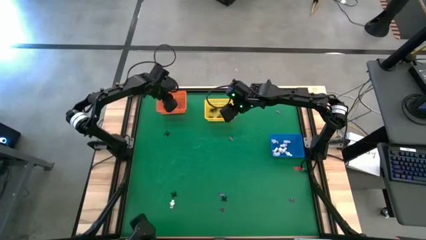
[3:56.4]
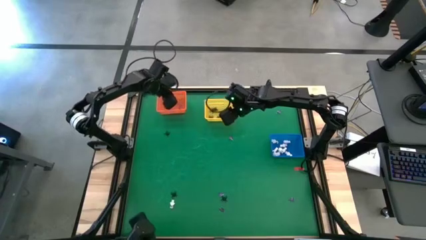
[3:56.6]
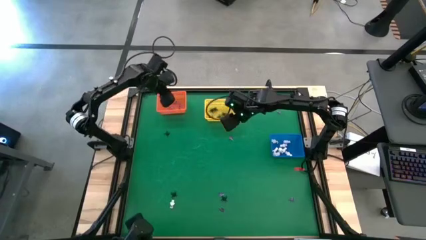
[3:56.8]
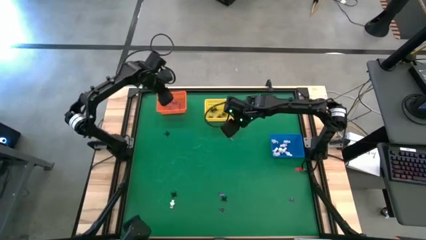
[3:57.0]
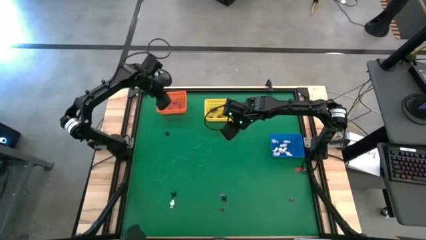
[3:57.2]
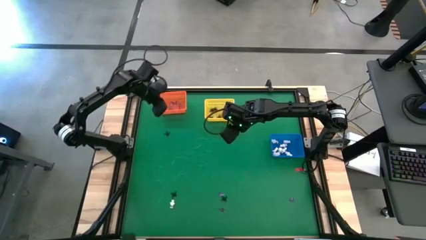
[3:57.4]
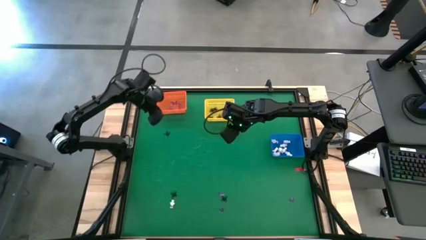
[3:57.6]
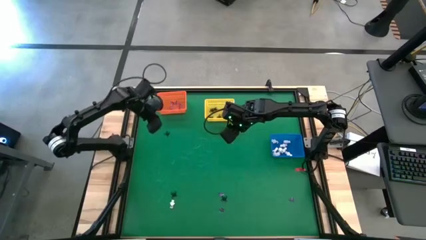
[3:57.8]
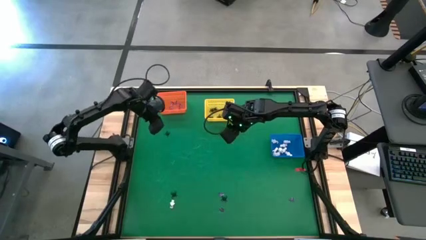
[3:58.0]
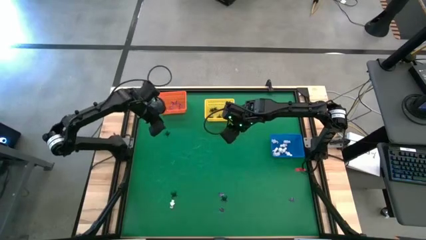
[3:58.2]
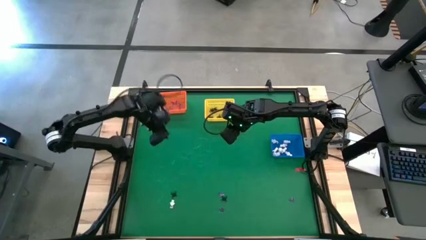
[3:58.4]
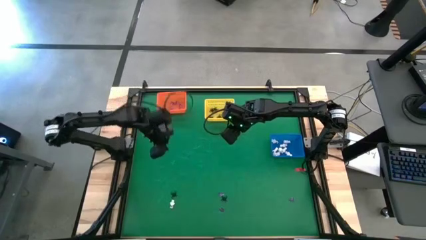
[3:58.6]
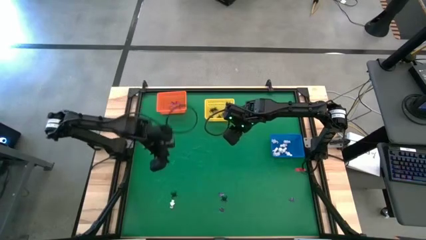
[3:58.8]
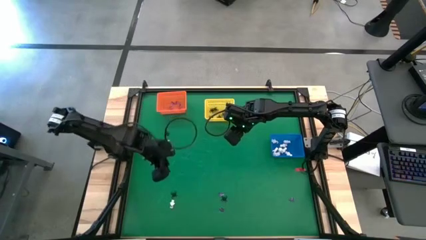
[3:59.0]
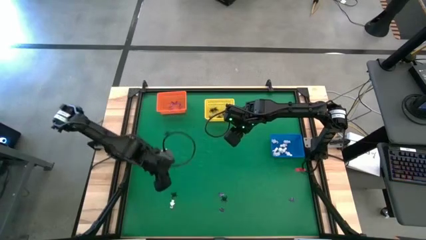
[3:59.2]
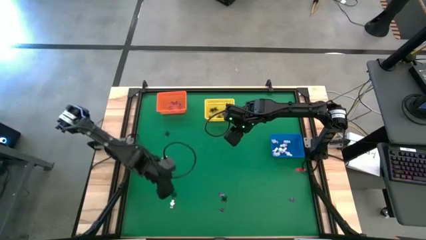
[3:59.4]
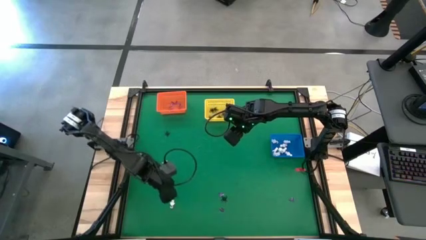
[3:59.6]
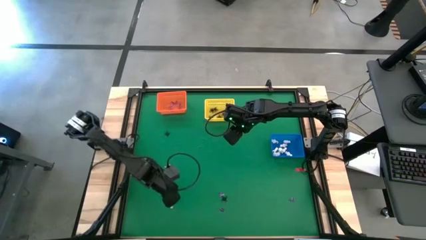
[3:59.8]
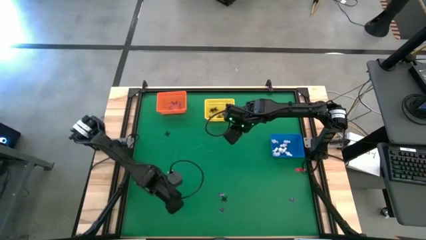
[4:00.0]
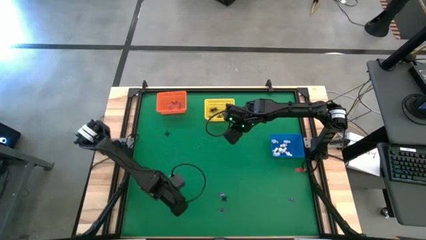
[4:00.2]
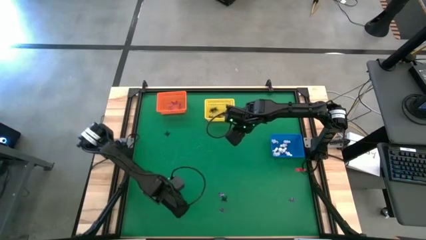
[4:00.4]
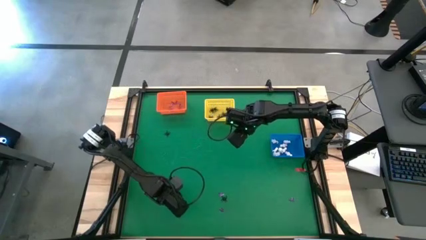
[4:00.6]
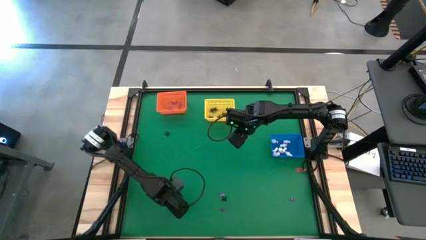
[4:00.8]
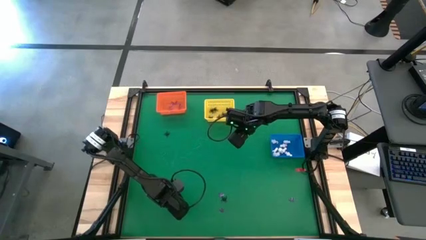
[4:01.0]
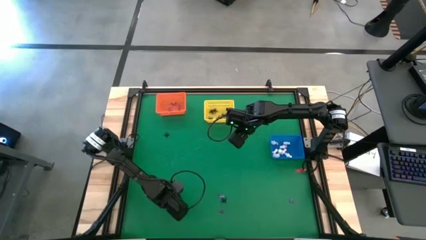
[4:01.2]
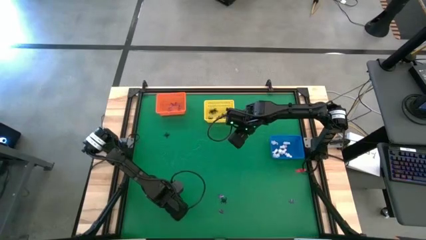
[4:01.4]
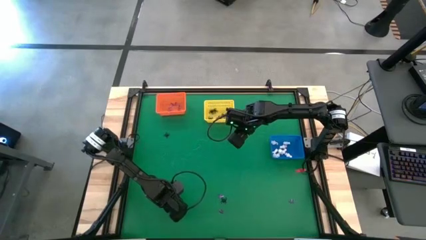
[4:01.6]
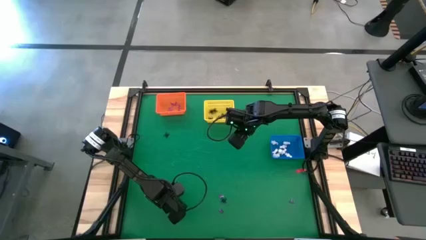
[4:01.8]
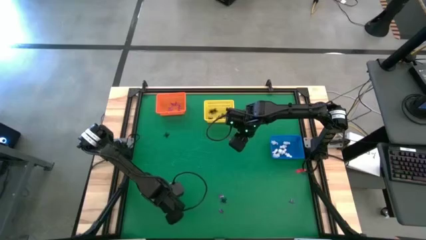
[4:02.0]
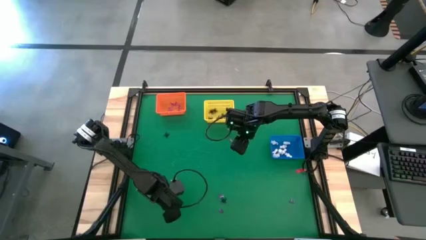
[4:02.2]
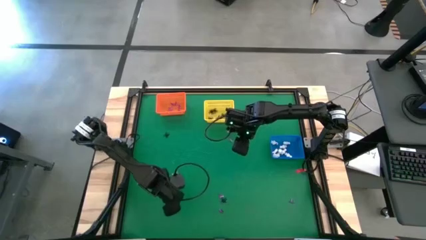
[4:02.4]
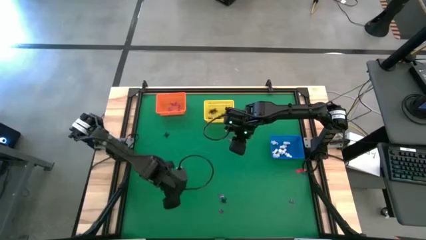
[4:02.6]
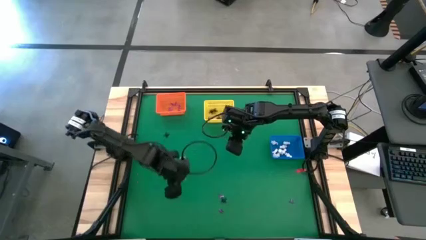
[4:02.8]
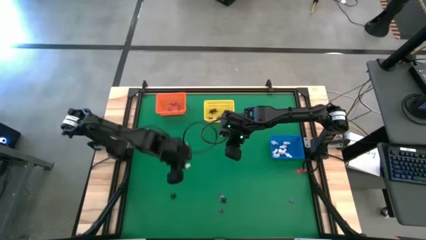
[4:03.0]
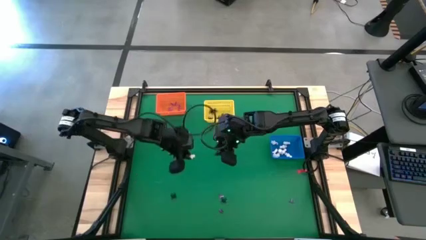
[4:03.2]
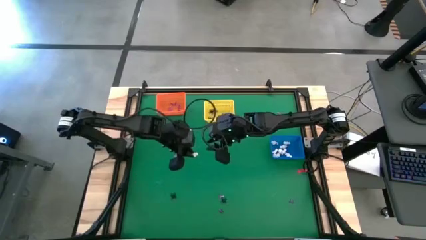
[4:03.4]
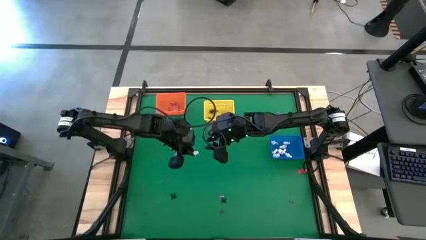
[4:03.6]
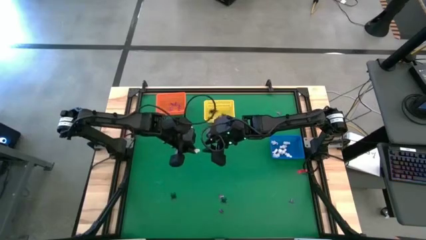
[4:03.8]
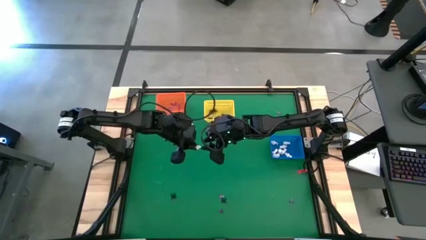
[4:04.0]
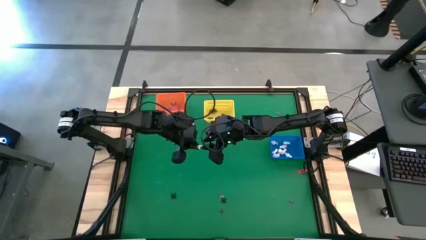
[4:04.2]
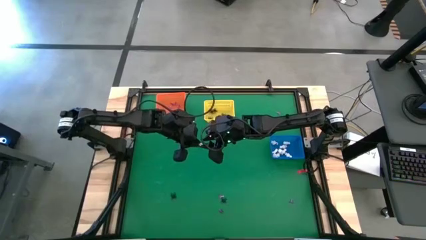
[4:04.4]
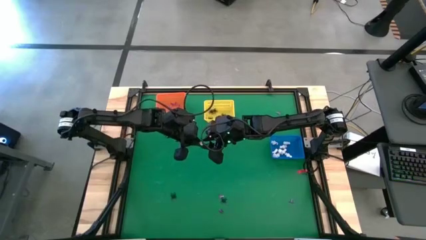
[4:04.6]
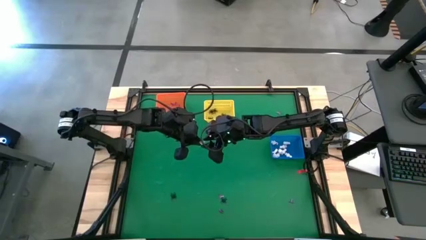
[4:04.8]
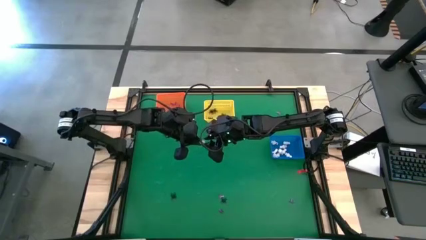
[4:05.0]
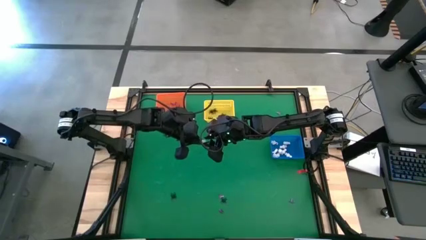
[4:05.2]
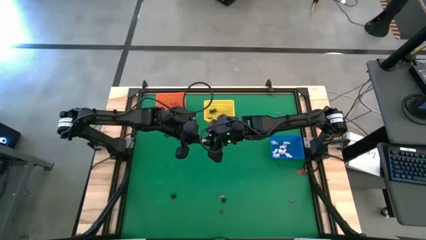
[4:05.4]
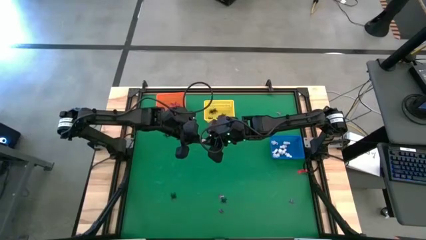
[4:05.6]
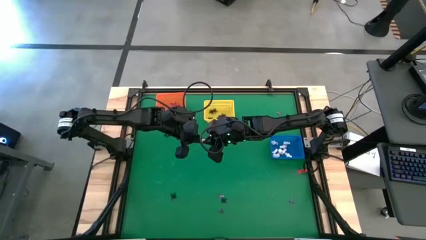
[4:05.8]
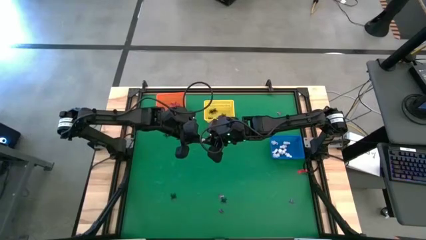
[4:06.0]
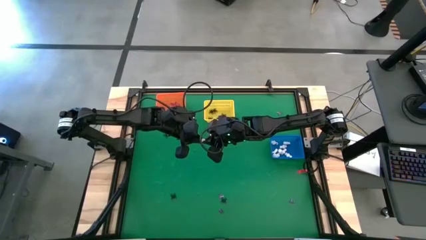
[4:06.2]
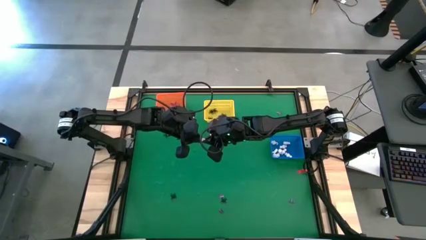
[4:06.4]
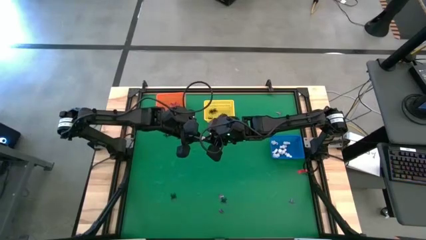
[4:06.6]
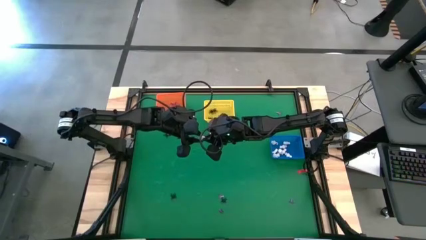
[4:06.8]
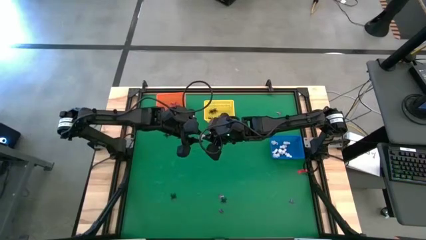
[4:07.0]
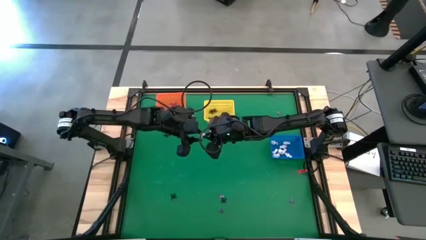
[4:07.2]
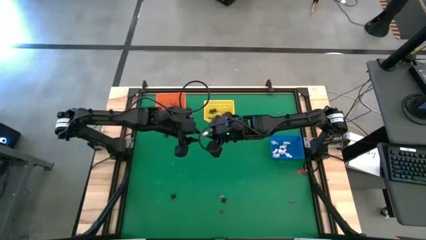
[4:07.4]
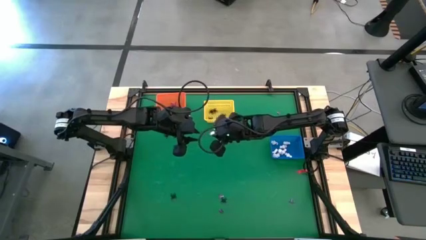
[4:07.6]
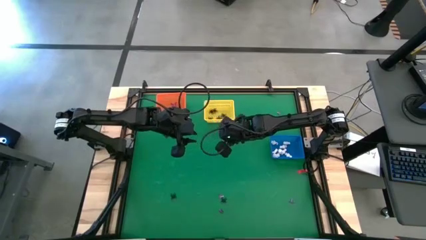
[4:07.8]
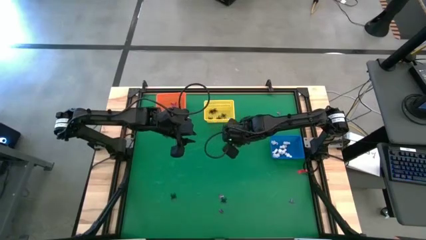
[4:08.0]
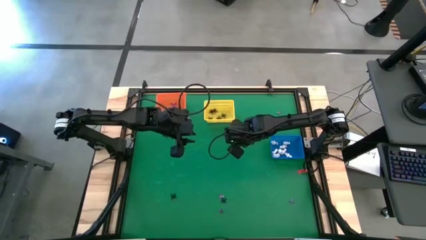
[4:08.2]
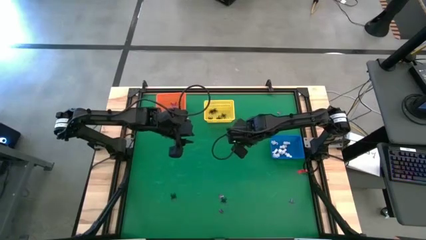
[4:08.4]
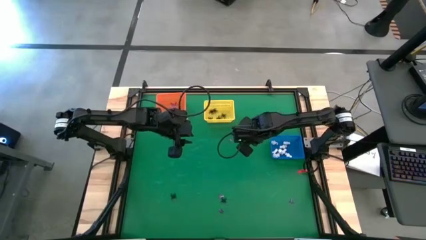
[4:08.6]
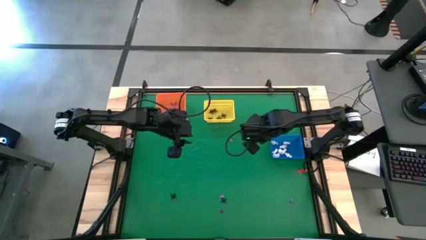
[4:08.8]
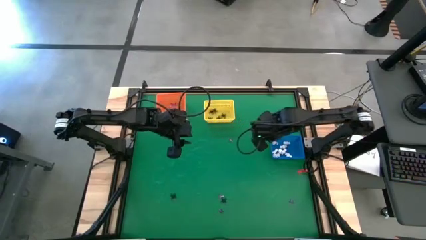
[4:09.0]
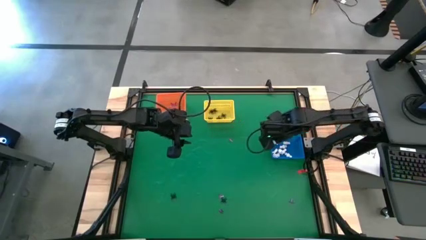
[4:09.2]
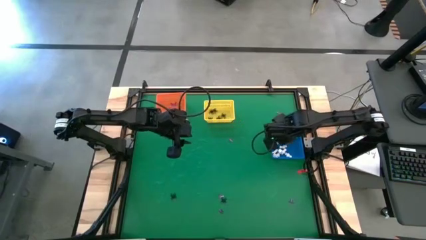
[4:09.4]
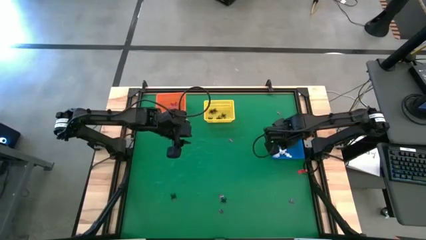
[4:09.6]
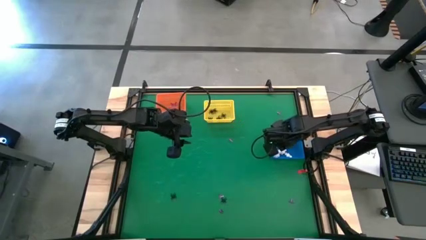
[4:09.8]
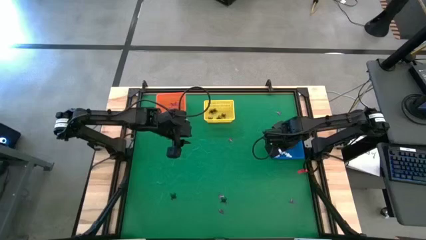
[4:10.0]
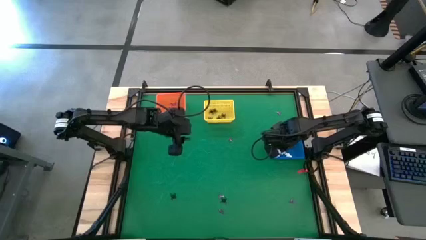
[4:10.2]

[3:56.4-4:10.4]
Task: Sort Halloween decoration
Put the white skeleton toy into the blue basket

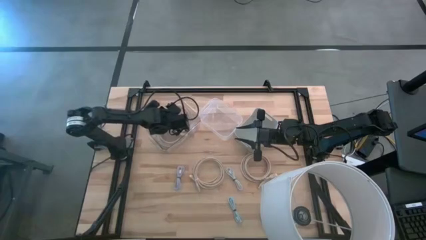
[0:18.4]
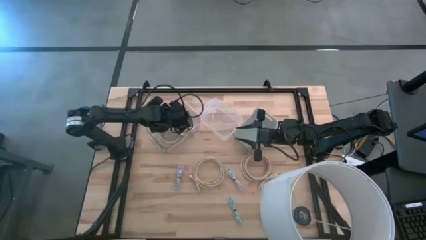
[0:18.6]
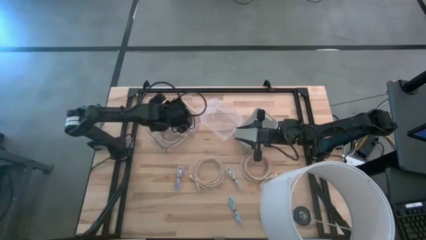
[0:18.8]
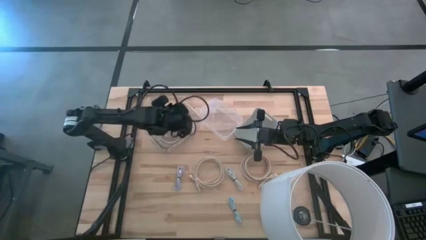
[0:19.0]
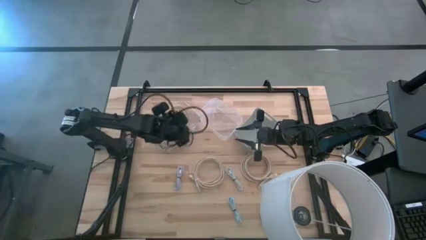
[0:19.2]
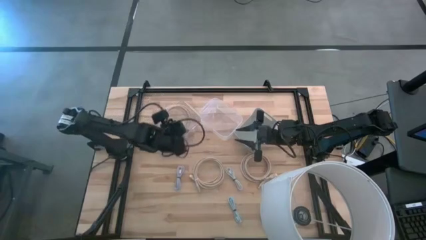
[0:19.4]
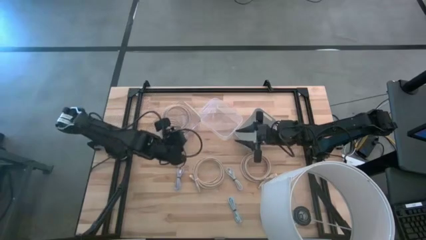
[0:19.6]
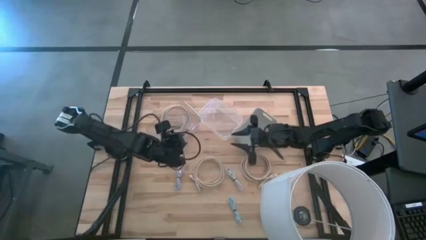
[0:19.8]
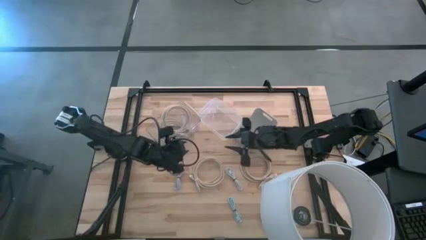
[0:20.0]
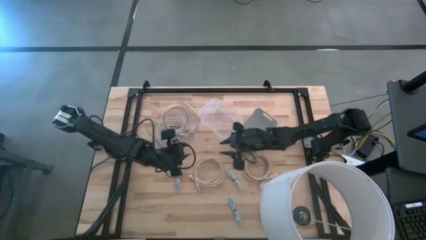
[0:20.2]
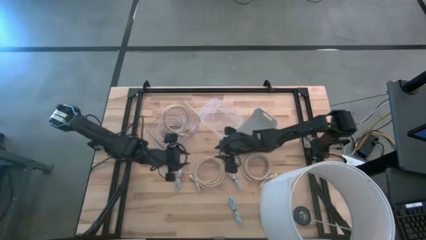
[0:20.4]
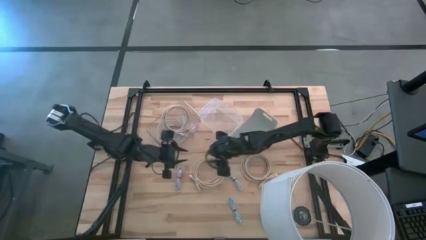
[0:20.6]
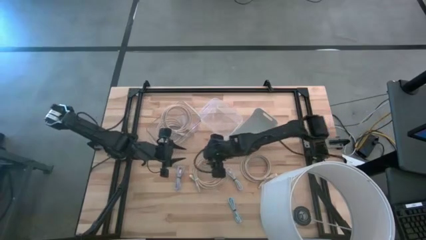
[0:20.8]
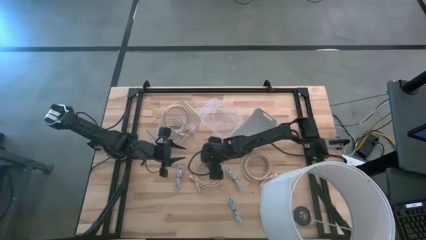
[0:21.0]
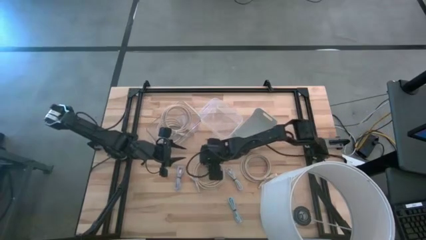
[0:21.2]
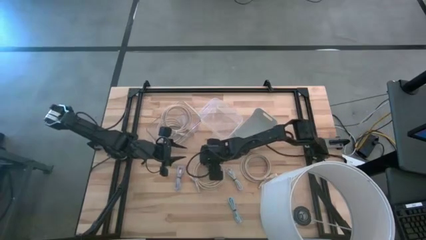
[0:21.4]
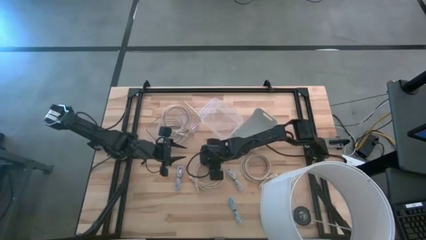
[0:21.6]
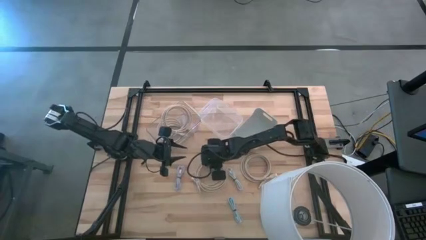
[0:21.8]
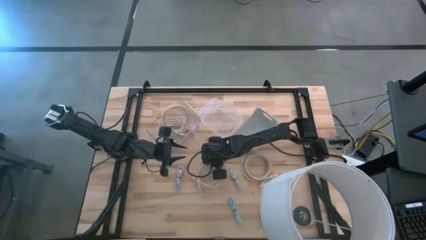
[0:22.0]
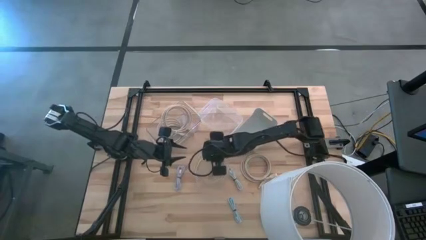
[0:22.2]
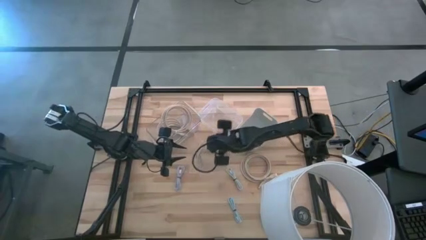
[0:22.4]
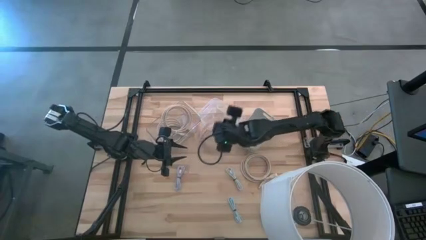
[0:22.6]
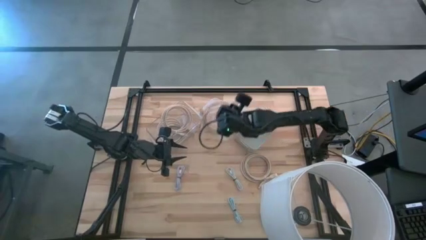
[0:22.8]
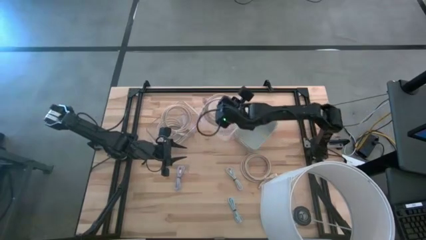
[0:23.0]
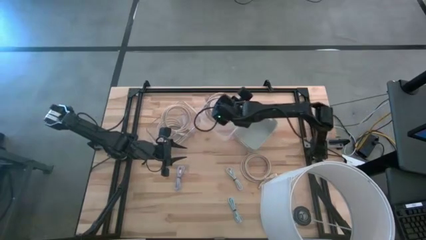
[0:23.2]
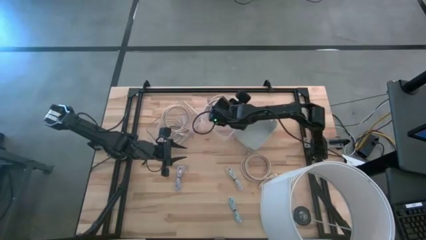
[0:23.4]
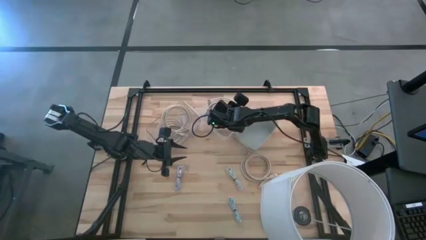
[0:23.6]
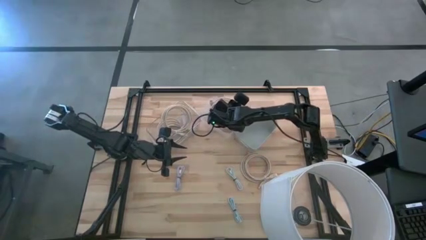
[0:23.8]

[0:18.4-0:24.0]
Task: Pick & Place USB Port
Put the light brown HDMI cable into the right transparent bin
